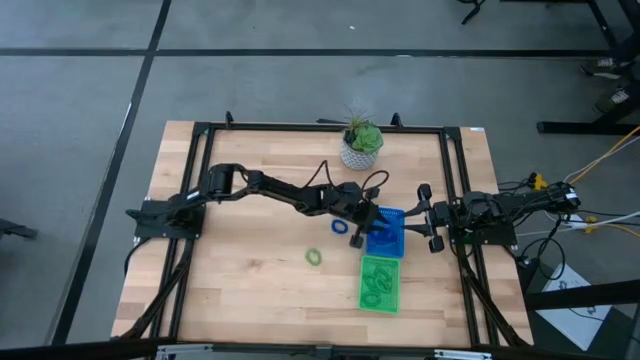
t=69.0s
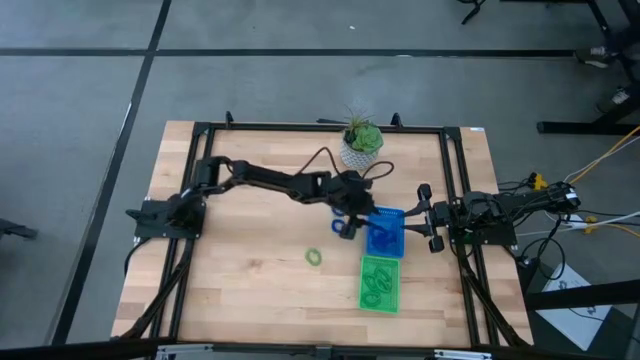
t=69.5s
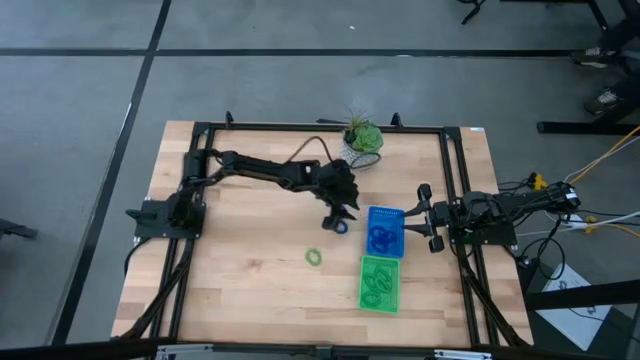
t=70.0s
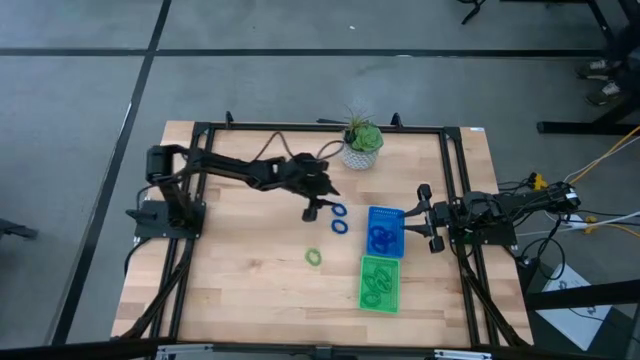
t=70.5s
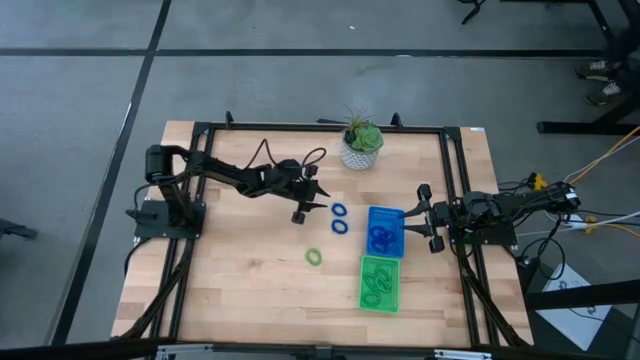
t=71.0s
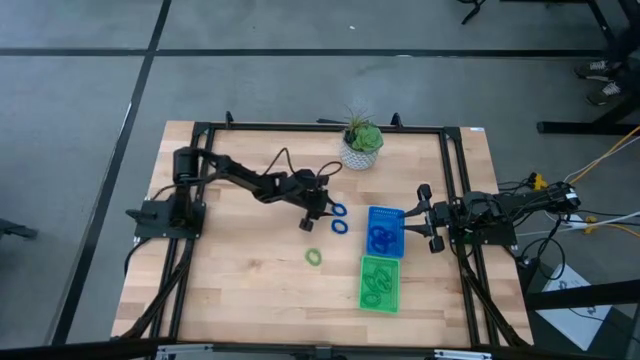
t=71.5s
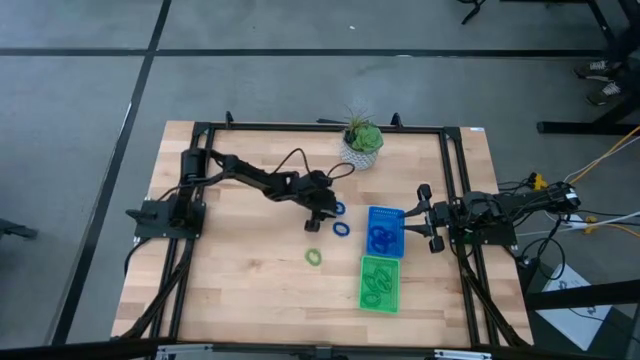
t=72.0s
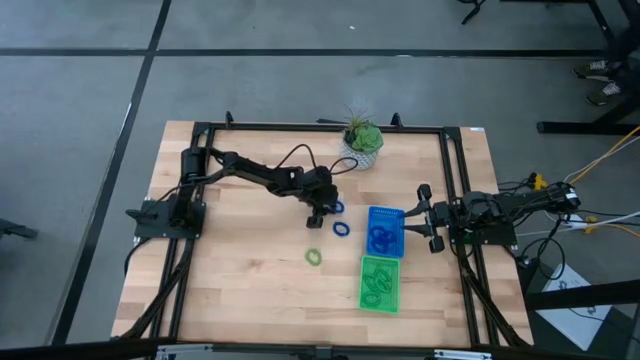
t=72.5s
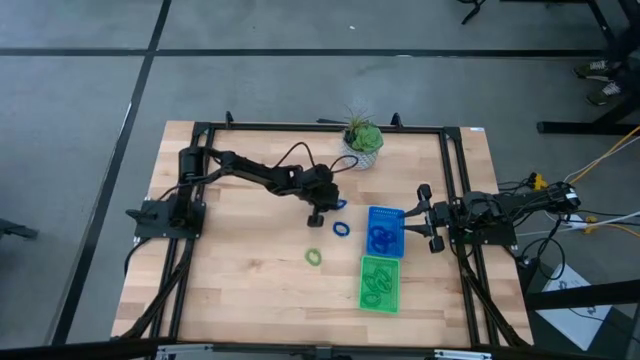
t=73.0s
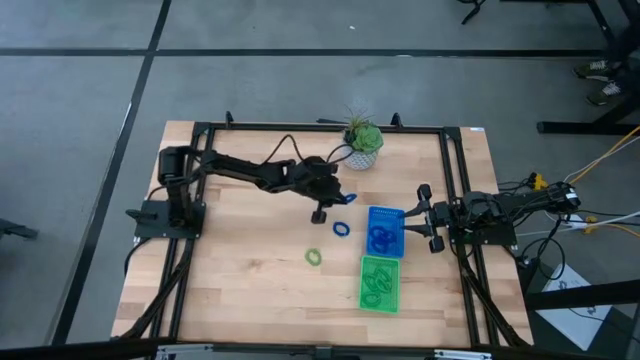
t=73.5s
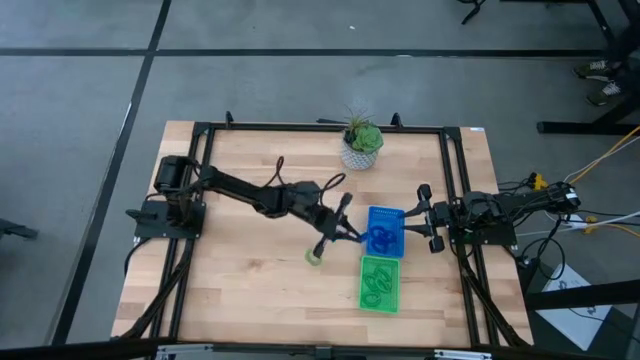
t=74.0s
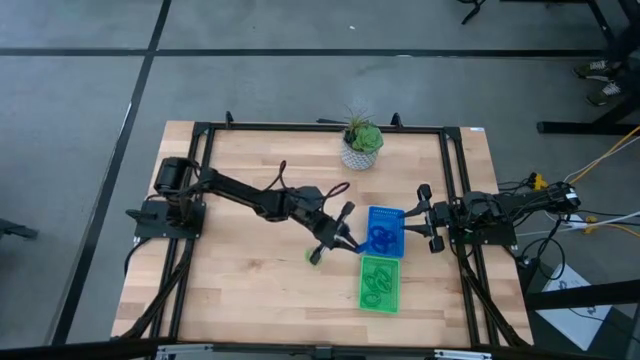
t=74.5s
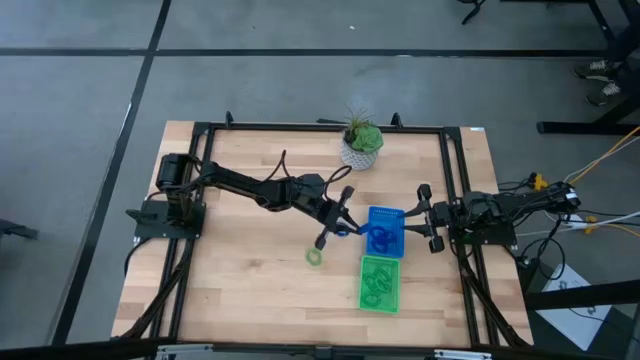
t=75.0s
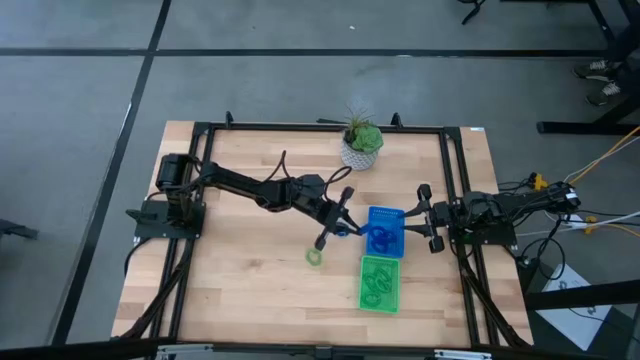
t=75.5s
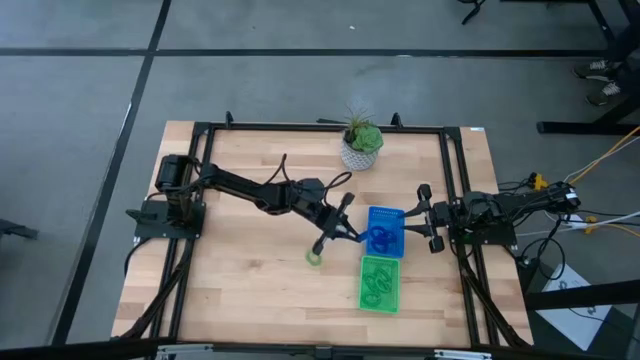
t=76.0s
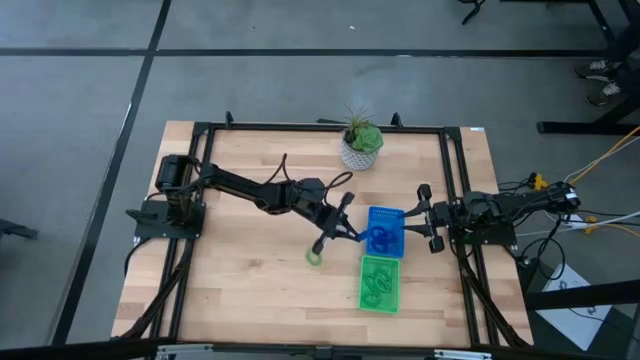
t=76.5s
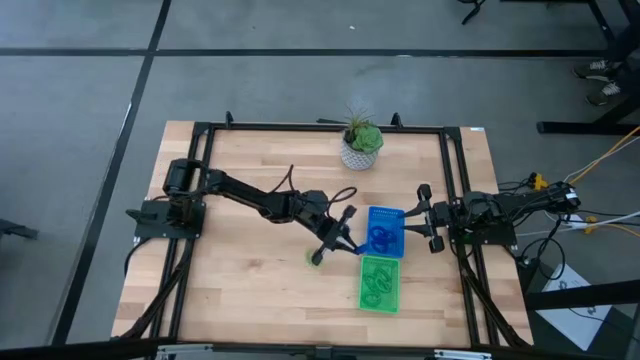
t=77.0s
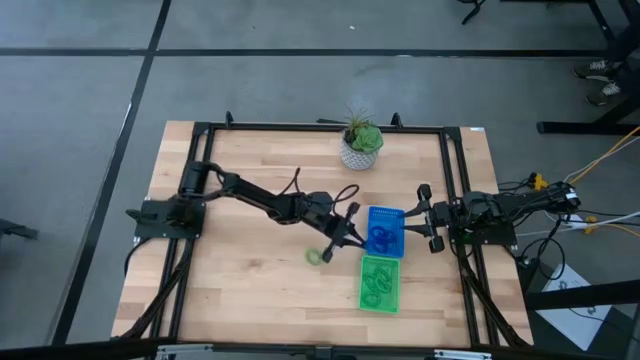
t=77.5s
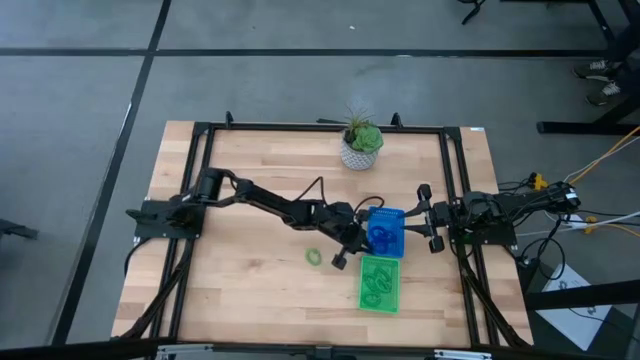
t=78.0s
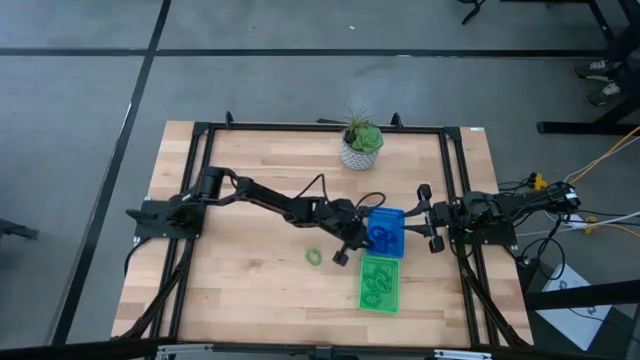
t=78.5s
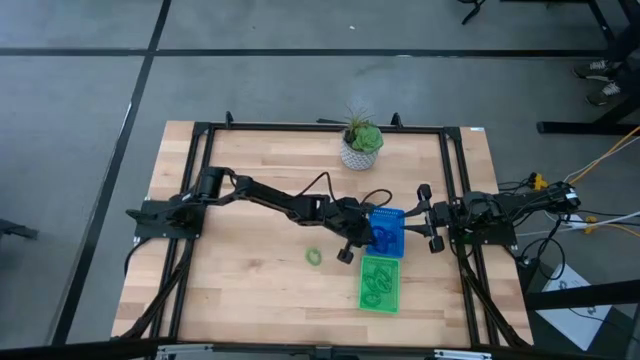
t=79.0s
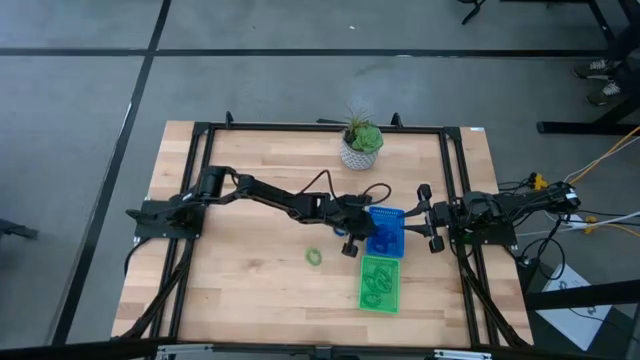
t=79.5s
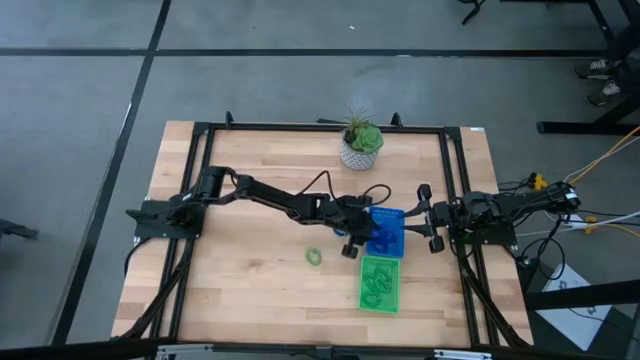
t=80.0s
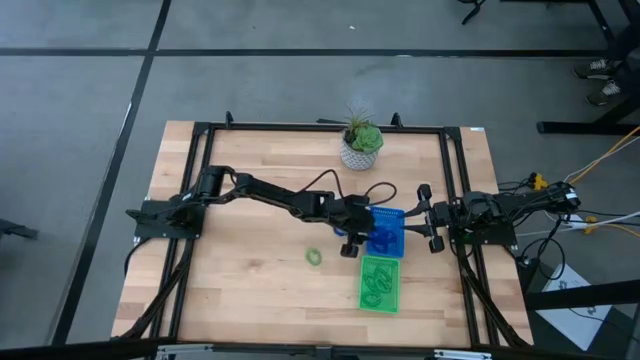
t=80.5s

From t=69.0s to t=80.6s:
Task: Sort spring keychains
Put the blue spring keychain into the blue bin

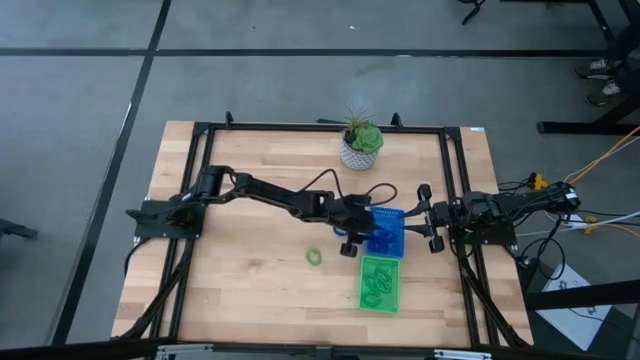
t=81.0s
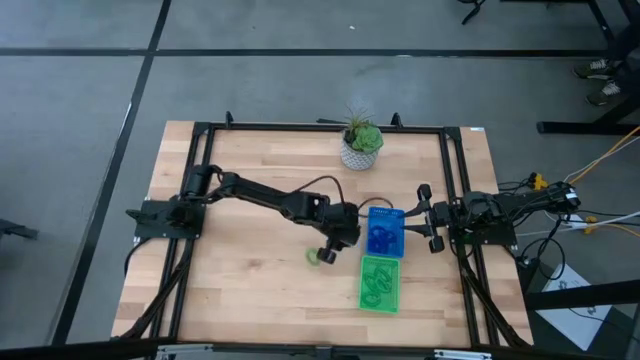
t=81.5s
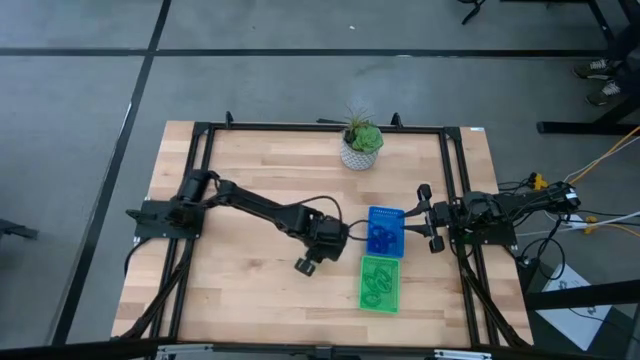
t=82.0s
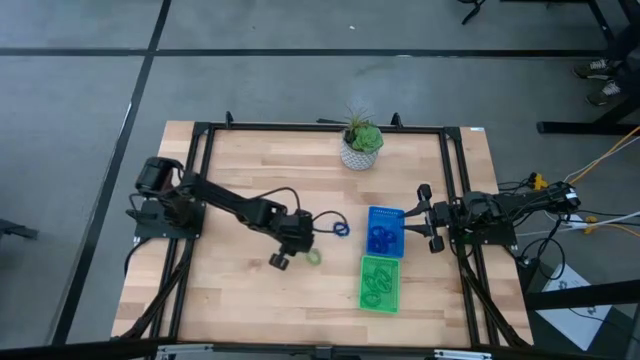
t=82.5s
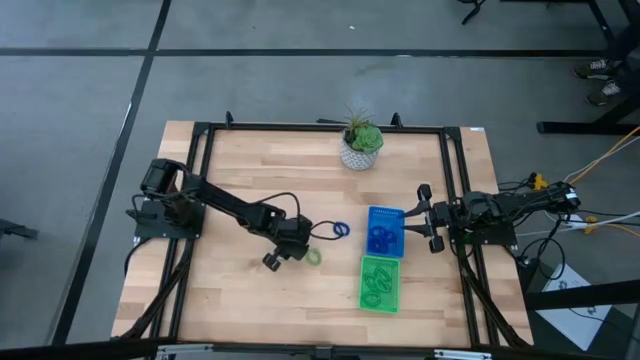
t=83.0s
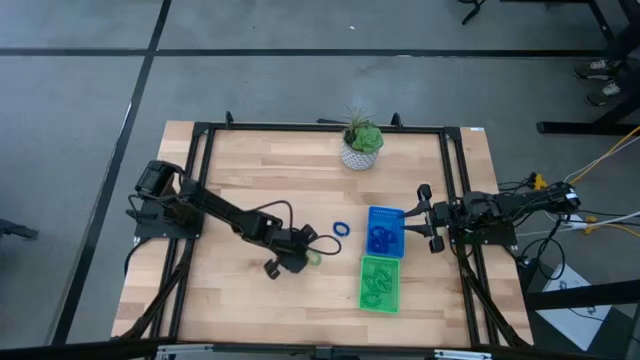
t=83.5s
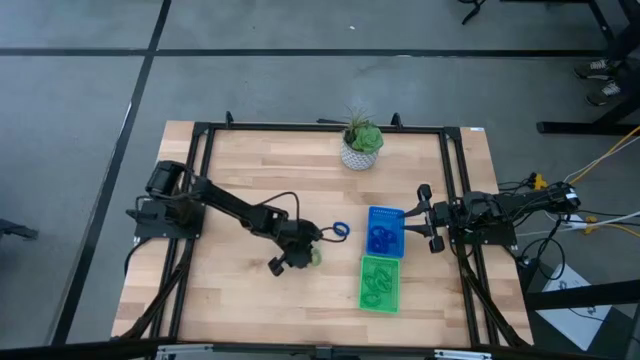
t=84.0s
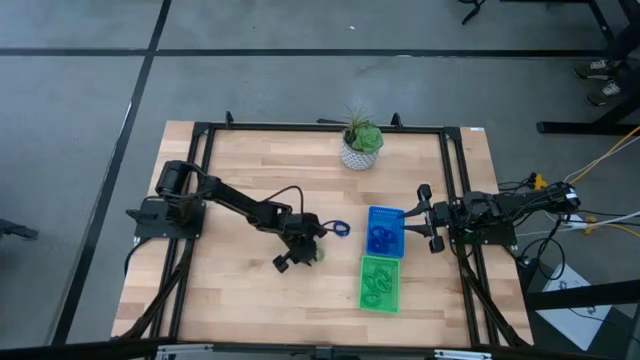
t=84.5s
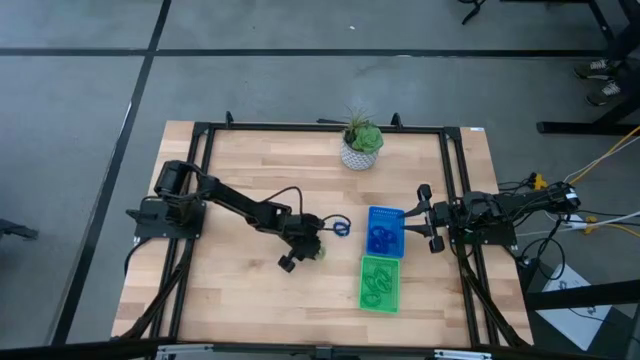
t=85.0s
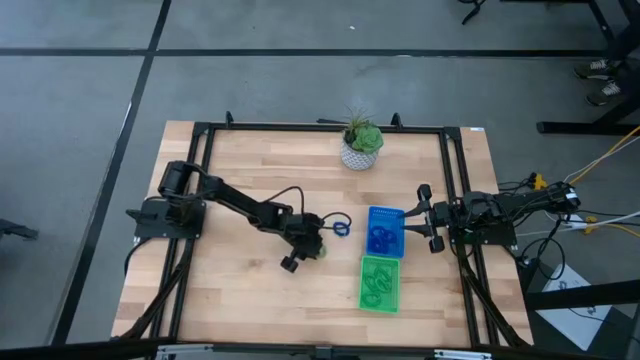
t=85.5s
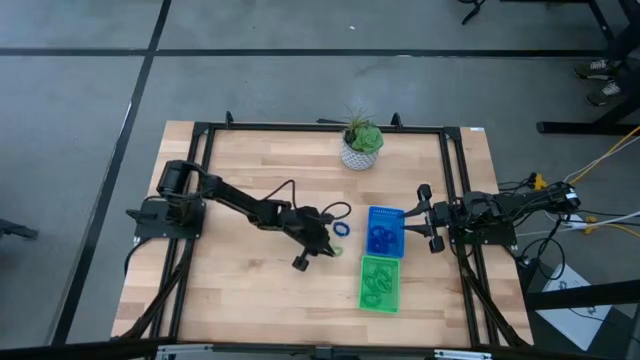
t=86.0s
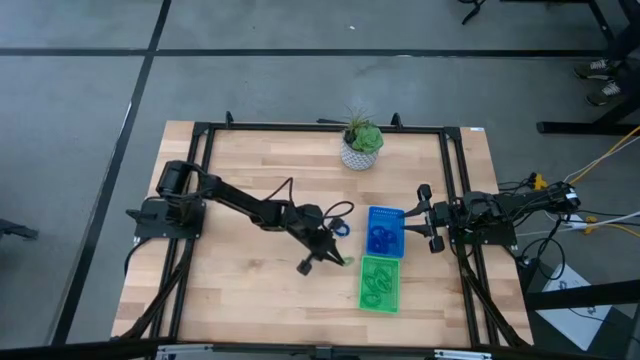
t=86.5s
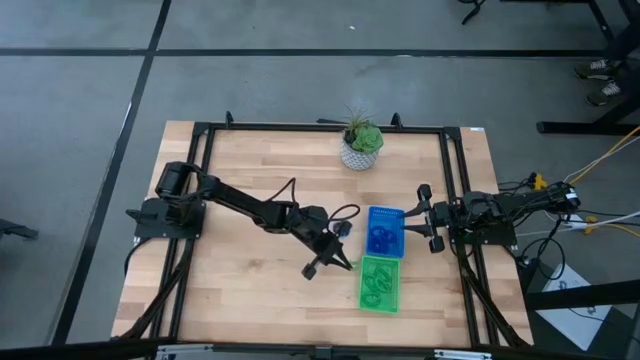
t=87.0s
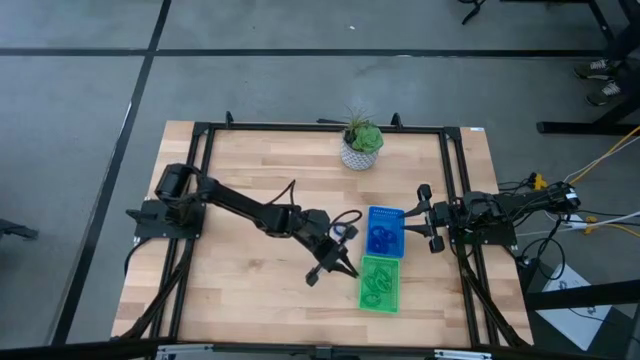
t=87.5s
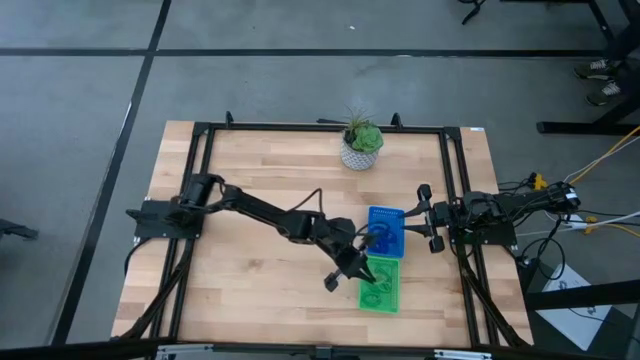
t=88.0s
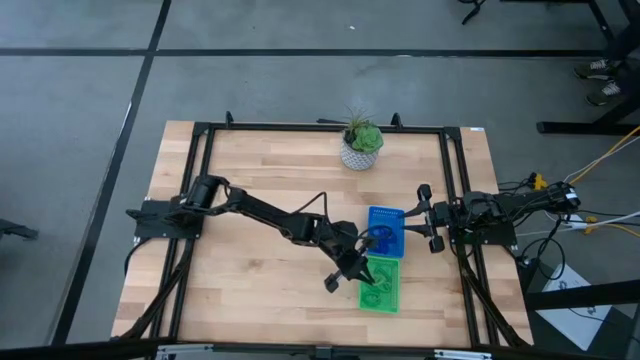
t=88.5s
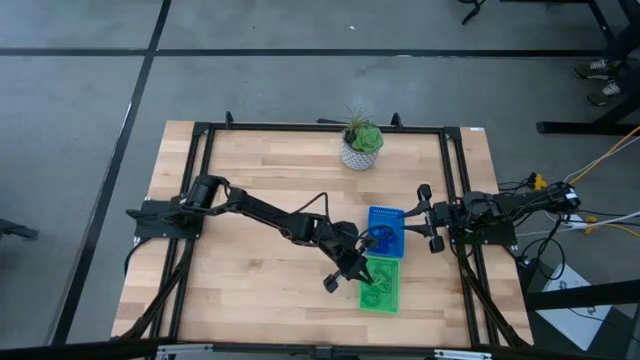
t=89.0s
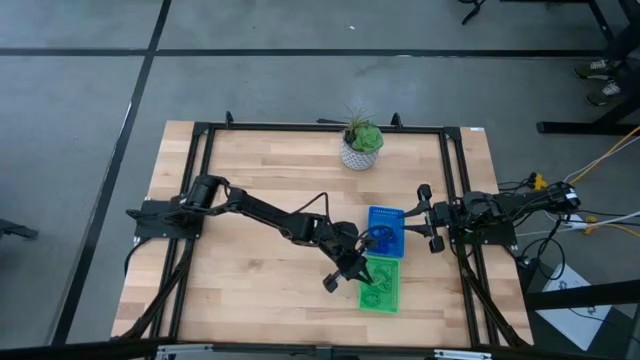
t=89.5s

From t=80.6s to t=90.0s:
Put the green spring keychain into the green bin
